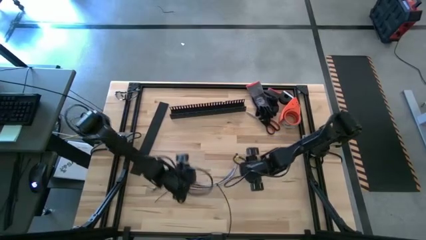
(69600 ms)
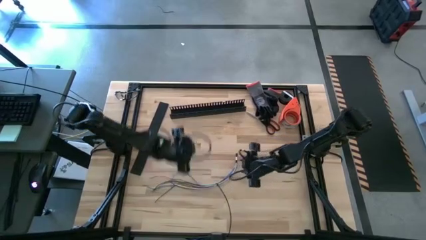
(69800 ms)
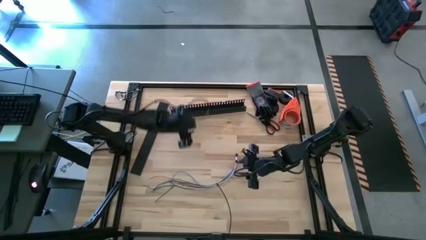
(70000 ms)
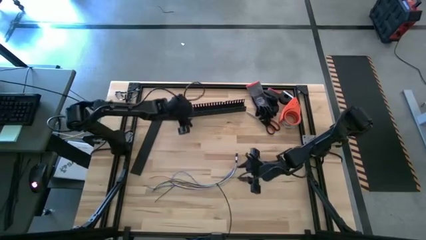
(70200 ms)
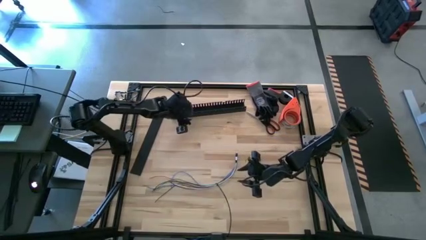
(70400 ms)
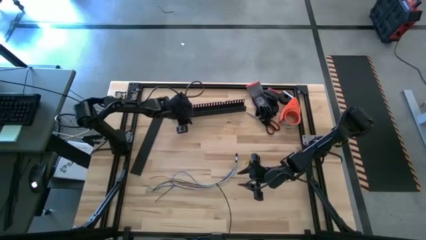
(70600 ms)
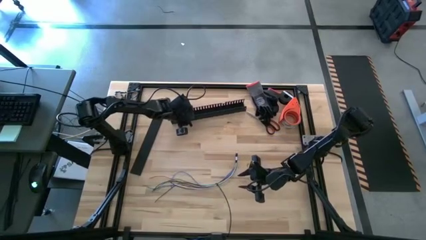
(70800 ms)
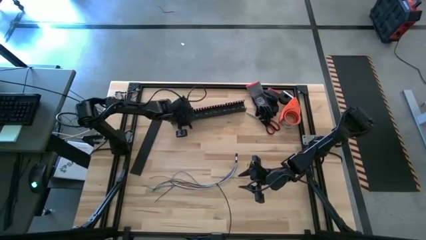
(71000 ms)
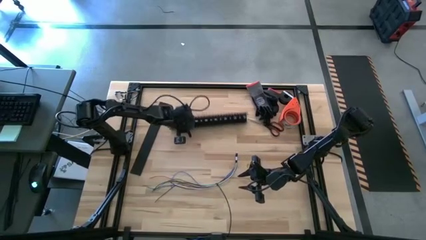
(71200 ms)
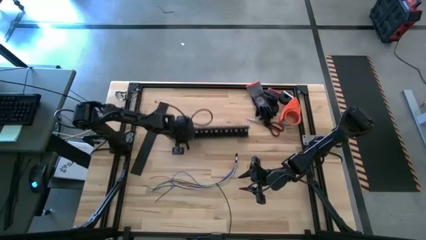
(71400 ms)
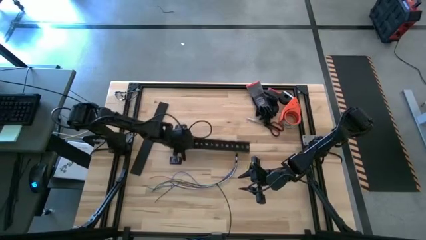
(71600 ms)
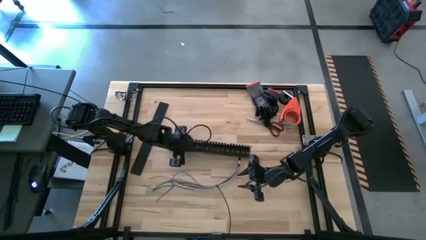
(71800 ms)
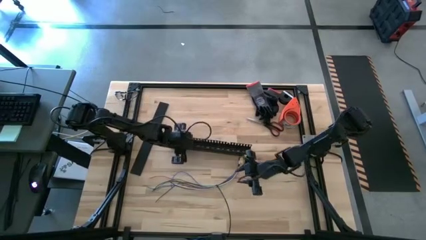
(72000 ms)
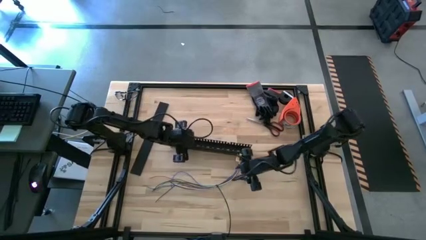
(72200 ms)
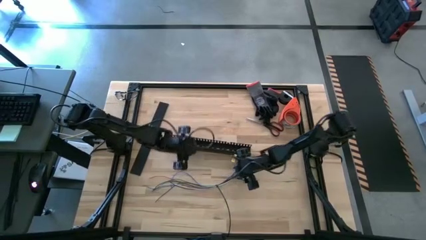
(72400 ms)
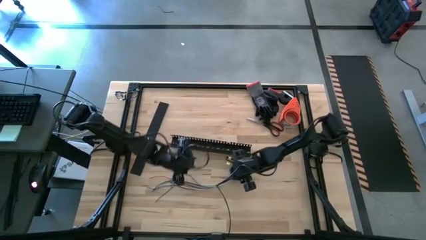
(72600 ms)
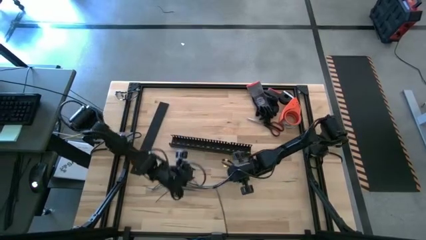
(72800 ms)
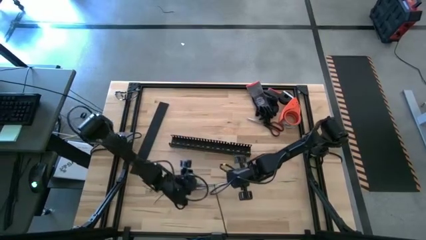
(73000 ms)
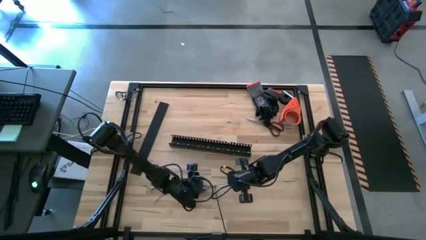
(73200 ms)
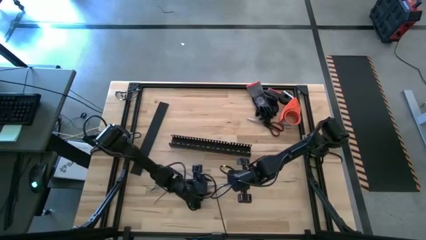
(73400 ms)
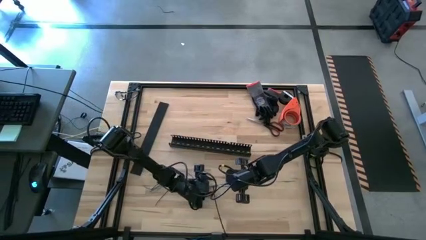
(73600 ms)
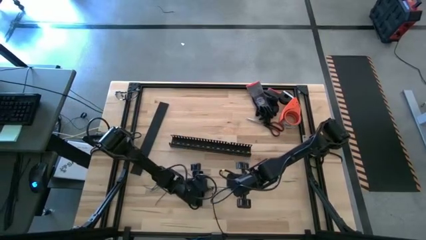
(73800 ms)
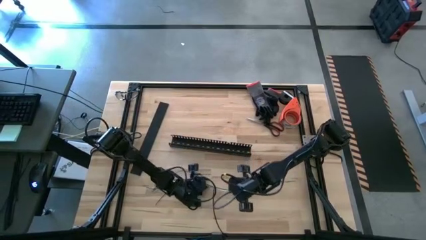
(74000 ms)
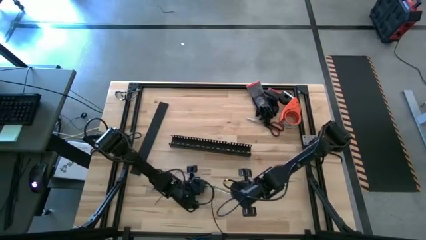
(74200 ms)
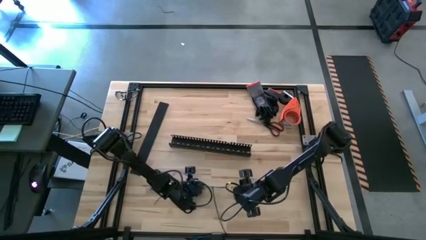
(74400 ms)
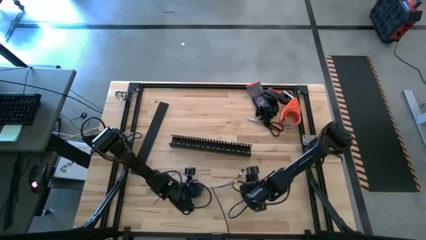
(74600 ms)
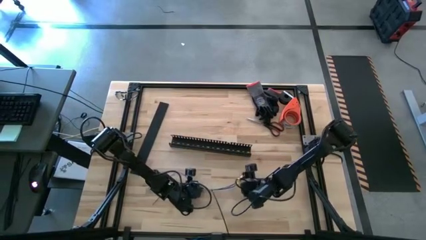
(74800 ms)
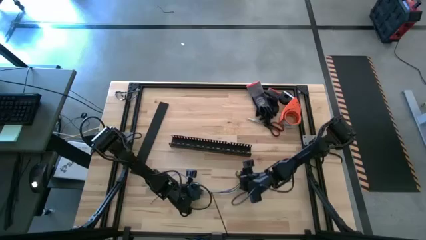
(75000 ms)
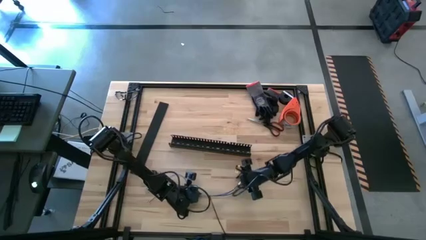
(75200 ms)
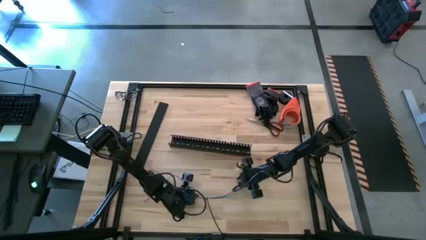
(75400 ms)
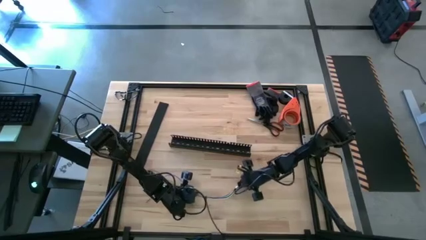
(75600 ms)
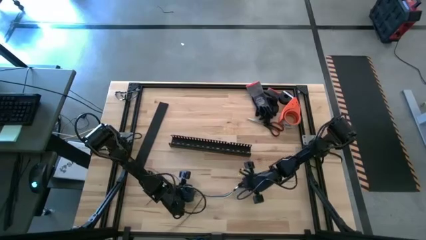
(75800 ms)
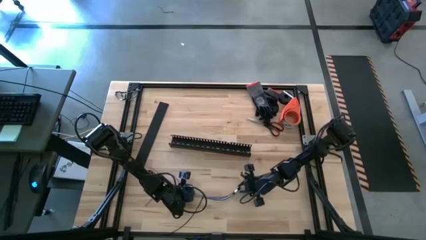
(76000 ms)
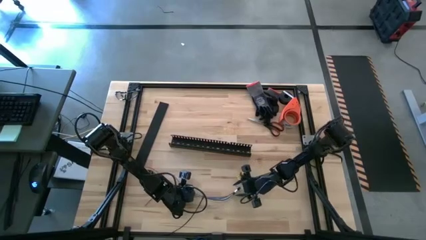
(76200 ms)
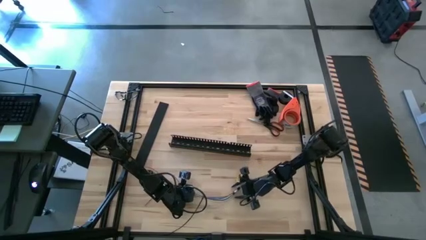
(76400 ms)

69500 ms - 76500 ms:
Task: Ziptie cables
Put the zip-tied cables into the black cable duct

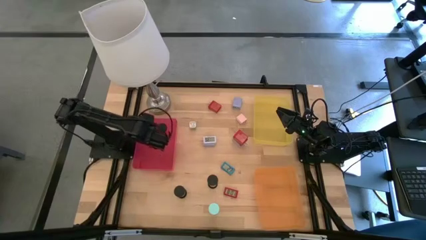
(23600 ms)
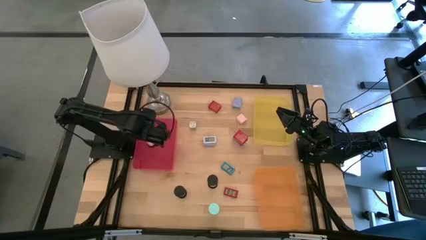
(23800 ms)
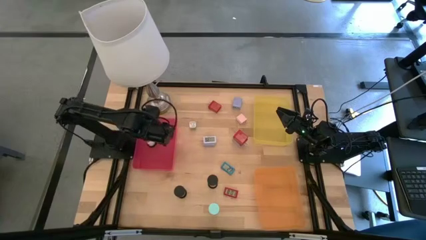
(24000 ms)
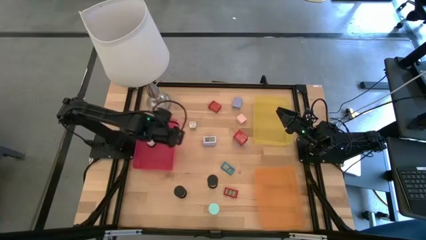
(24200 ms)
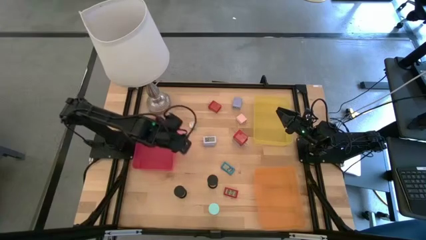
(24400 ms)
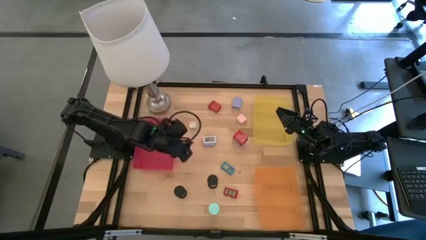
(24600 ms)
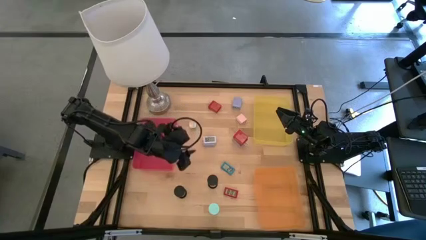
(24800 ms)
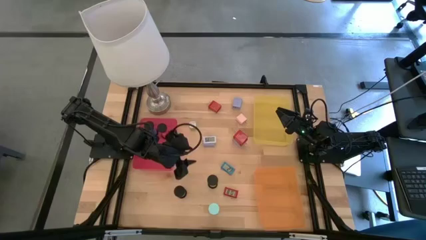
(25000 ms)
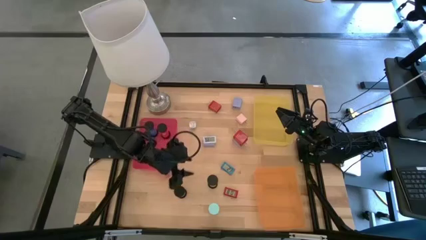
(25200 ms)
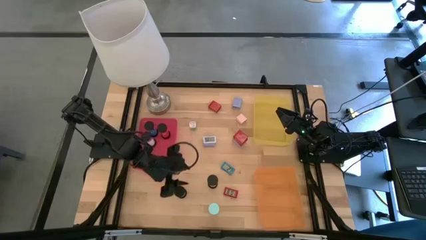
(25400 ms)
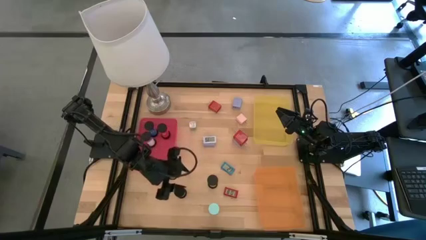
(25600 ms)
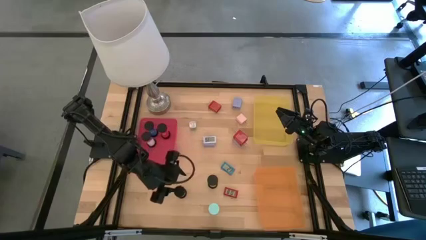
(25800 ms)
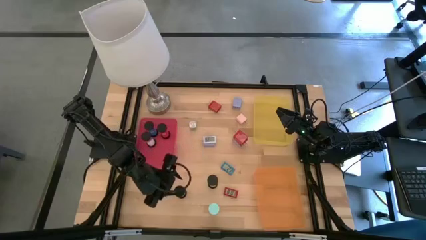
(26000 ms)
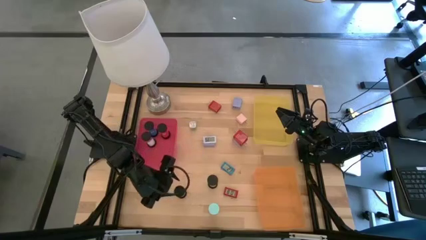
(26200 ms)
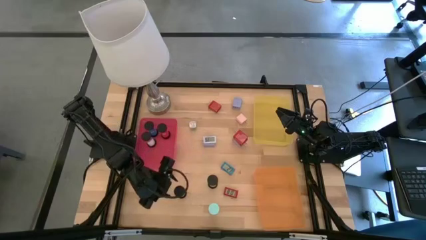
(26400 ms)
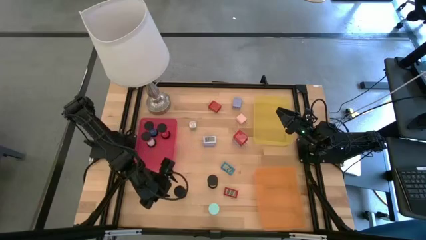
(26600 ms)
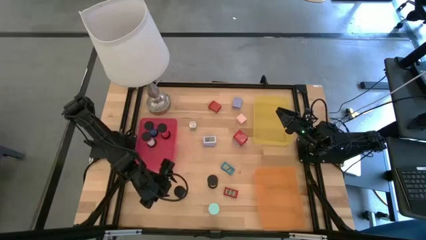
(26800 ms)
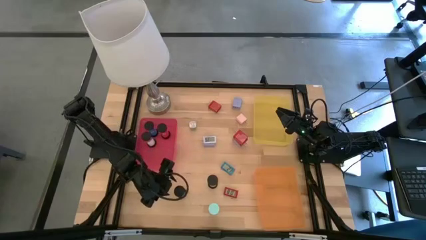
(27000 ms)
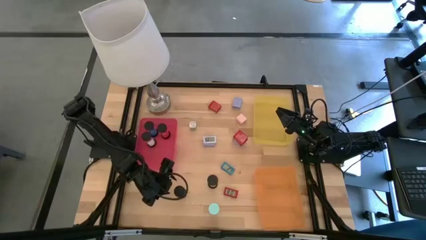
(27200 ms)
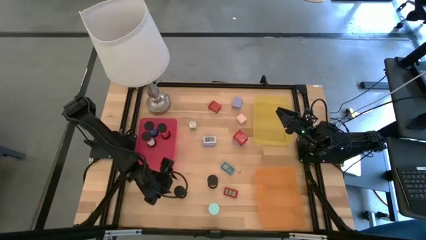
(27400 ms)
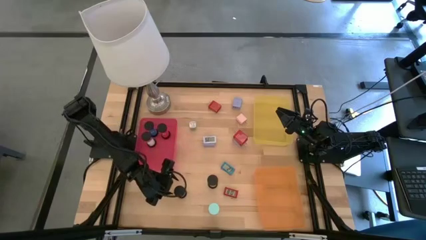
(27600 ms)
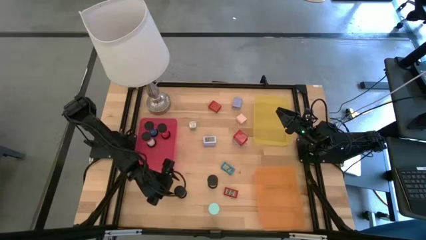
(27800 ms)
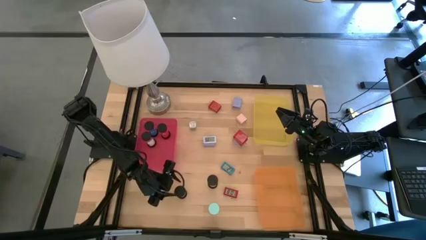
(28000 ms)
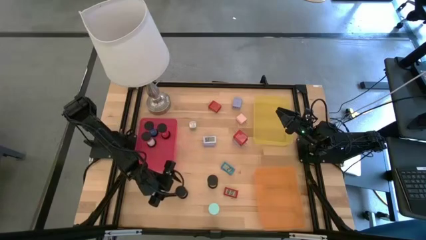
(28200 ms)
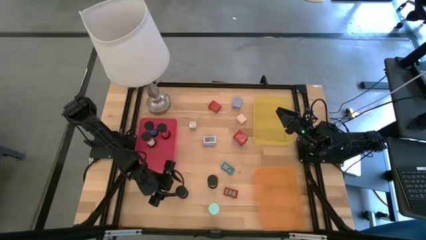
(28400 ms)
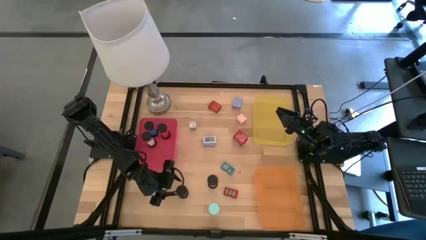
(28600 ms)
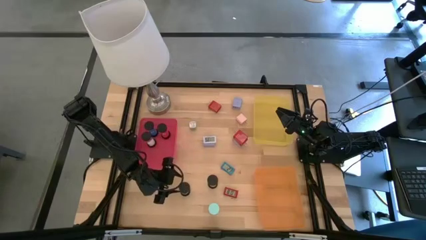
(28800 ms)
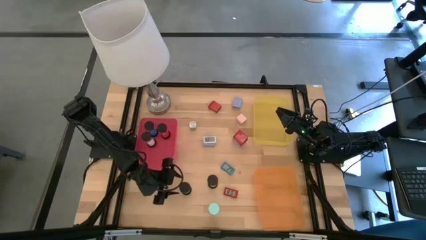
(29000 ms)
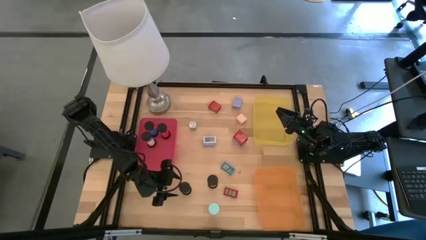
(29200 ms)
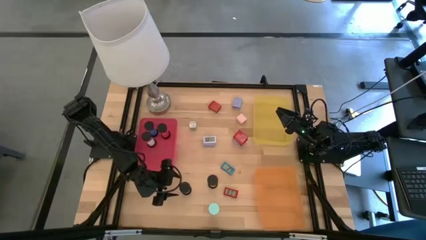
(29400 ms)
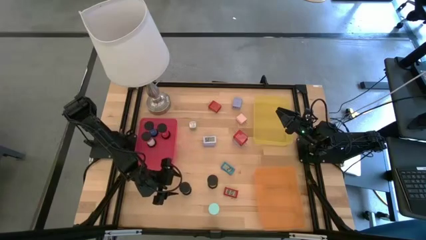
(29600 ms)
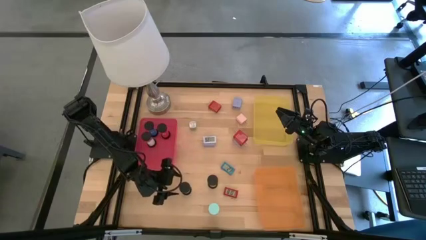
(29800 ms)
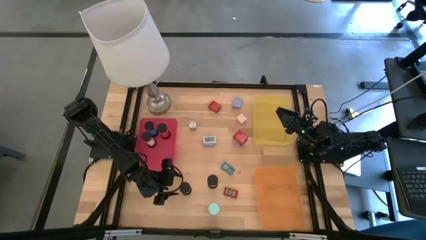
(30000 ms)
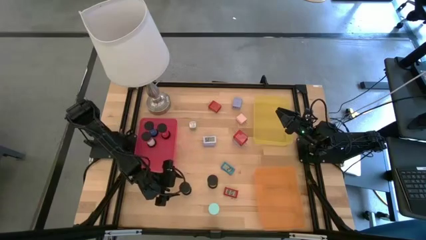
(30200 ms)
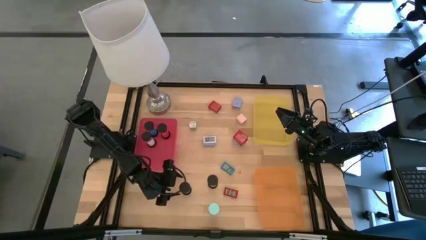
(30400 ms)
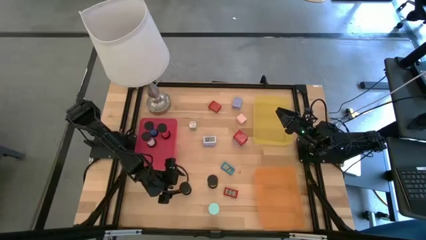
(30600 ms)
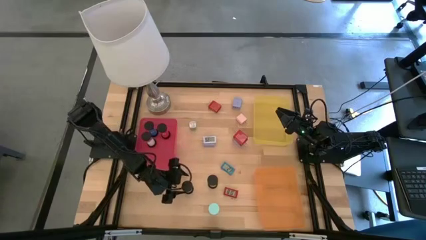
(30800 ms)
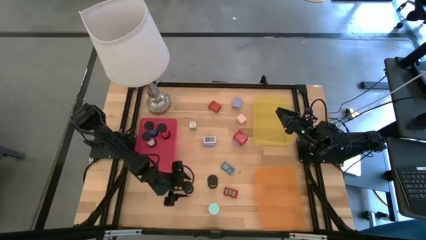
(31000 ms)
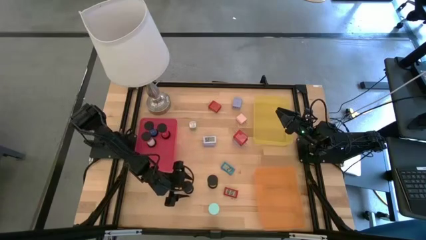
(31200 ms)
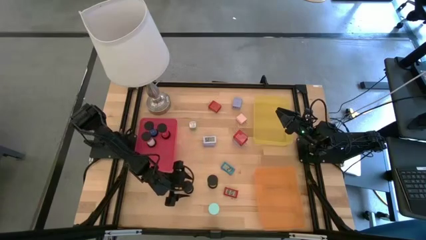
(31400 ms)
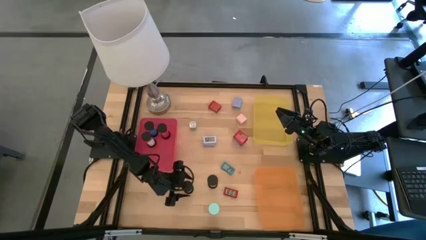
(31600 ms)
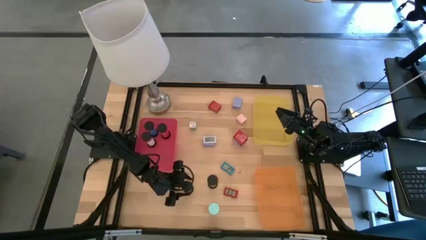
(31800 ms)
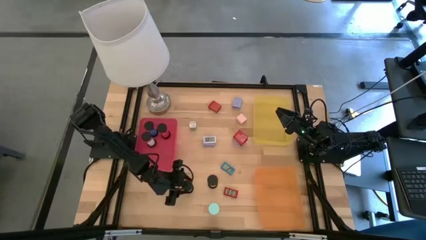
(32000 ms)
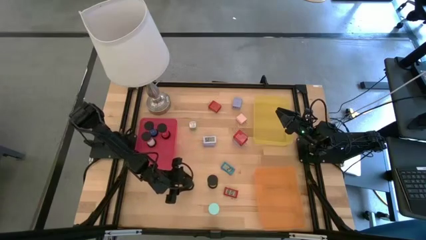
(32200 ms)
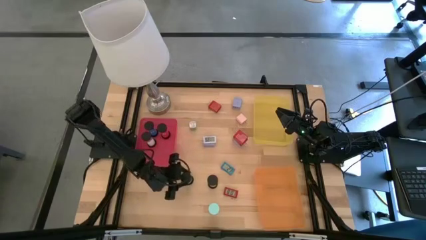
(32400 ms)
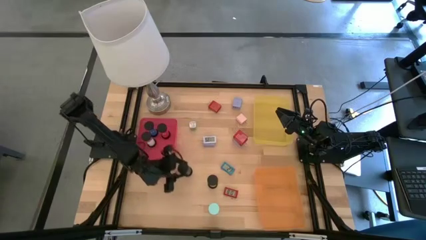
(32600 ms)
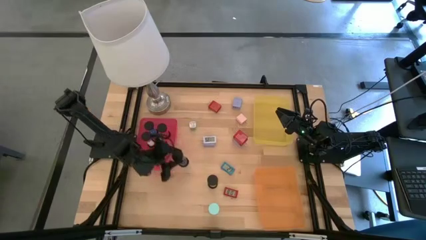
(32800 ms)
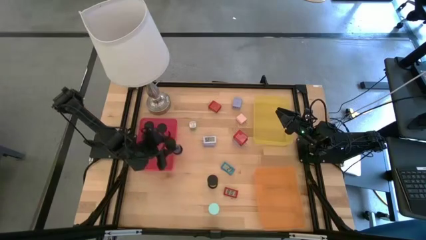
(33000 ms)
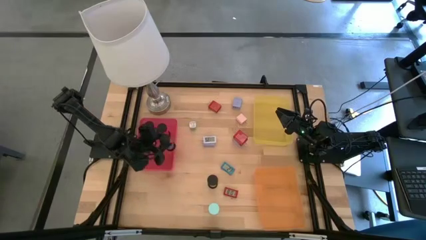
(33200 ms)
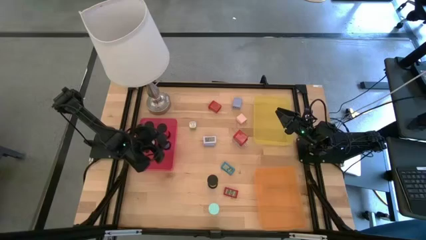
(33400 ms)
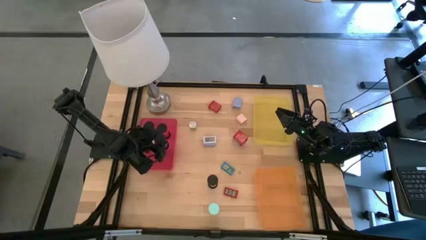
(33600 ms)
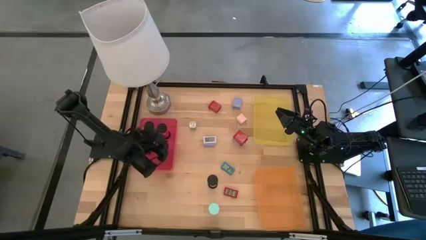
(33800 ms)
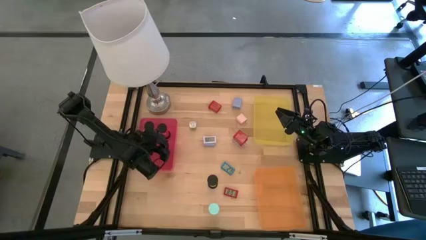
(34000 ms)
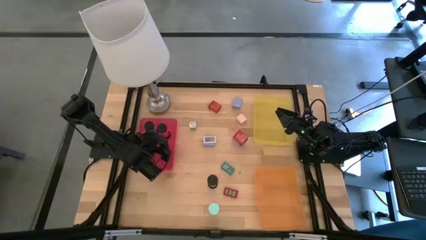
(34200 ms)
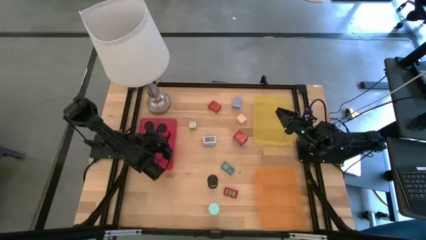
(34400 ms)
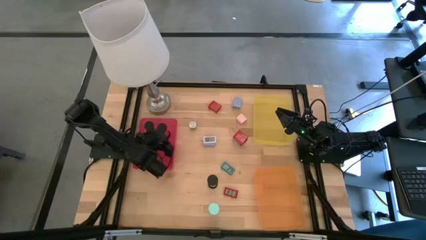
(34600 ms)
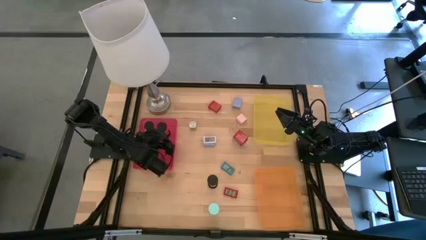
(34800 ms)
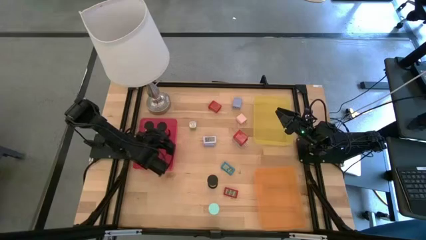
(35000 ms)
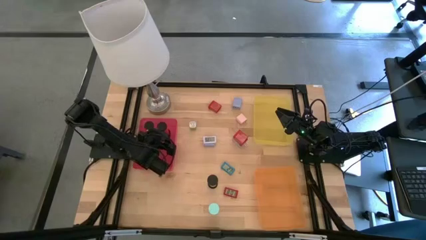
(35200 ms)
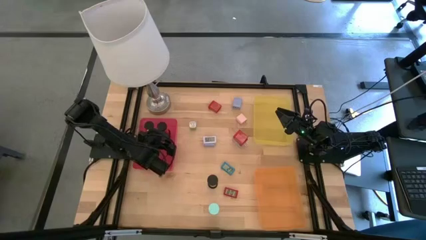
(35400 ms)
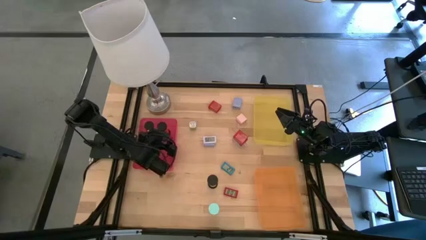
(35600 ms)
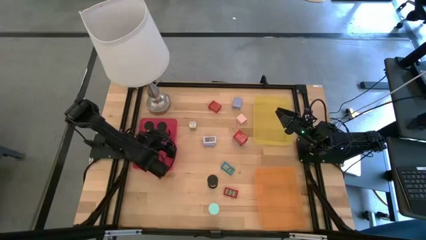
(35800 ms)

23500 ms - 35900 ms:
Task: Pick & Place Office items
Put the blue hourglass timer into the red bin
